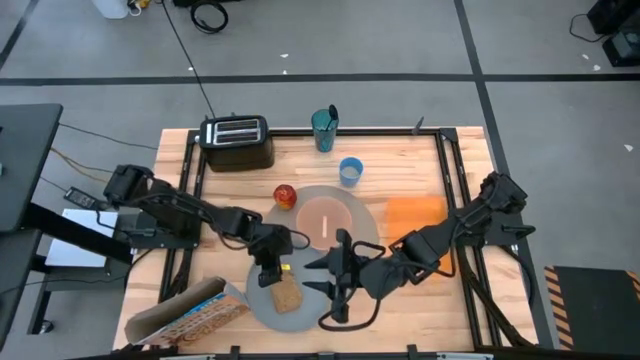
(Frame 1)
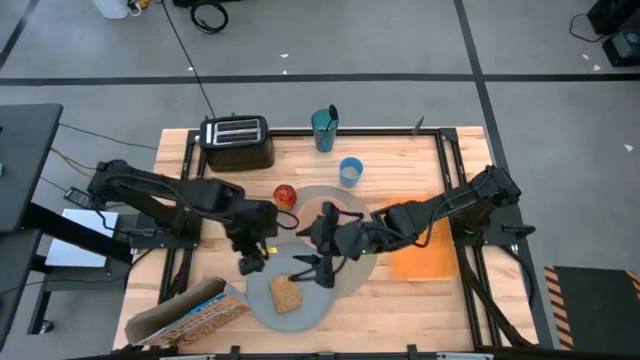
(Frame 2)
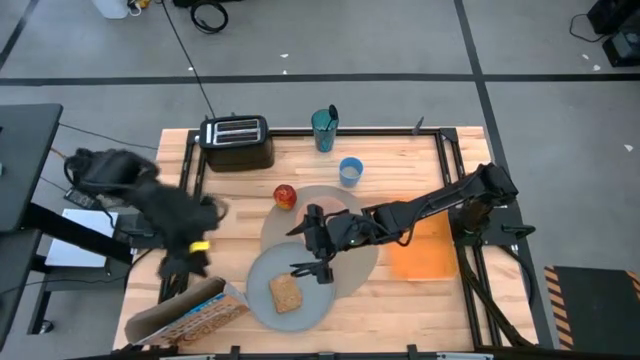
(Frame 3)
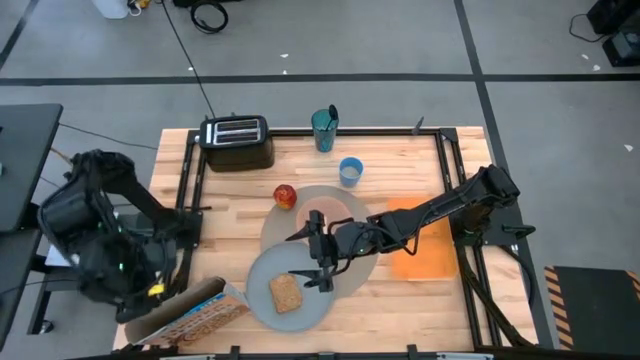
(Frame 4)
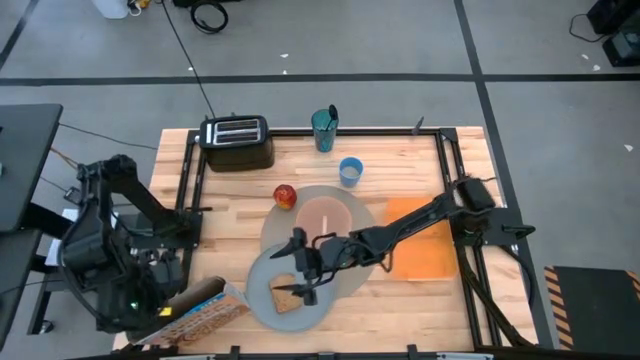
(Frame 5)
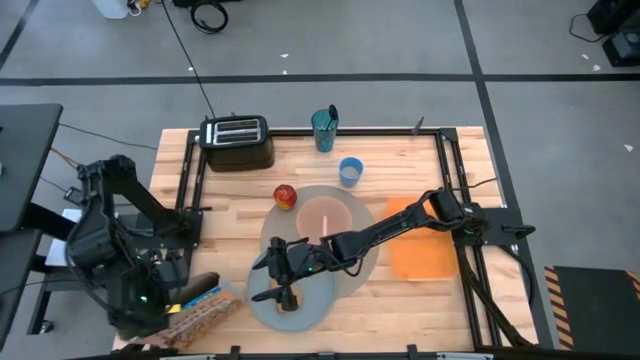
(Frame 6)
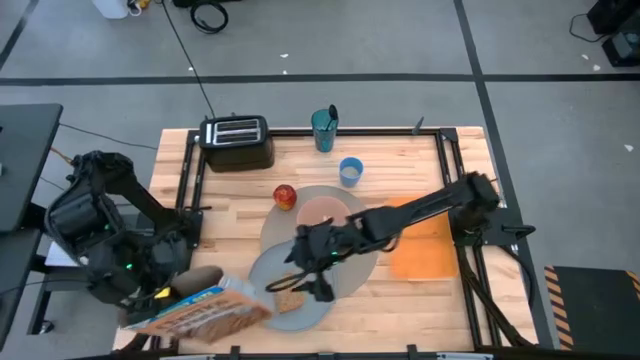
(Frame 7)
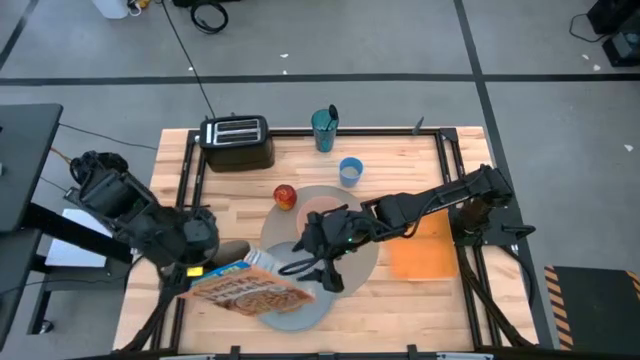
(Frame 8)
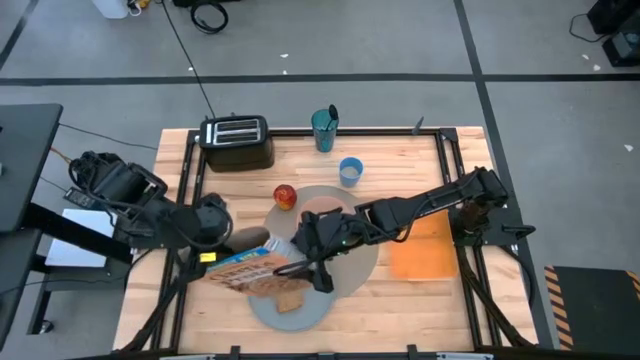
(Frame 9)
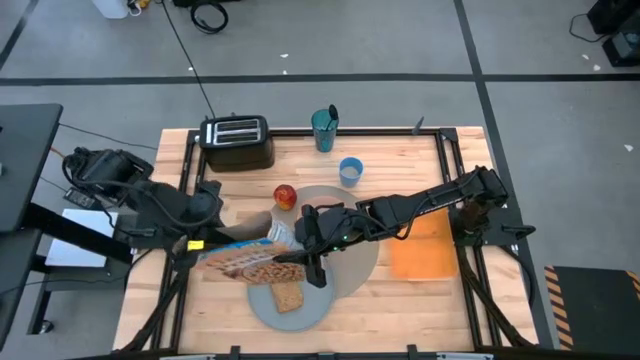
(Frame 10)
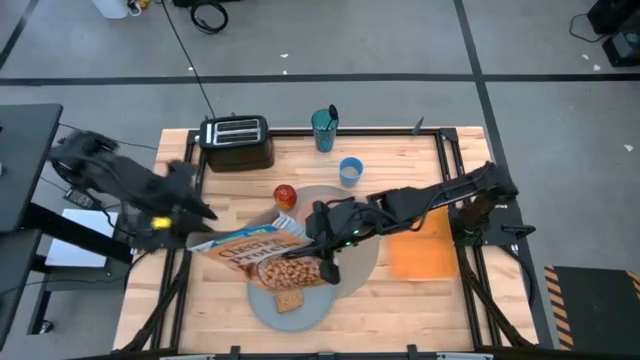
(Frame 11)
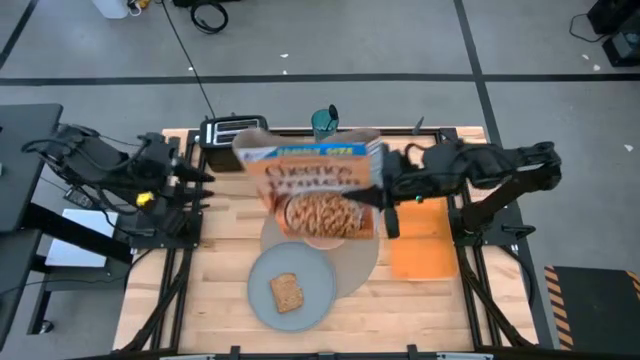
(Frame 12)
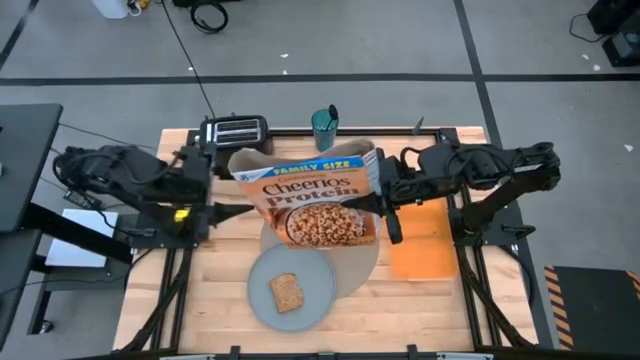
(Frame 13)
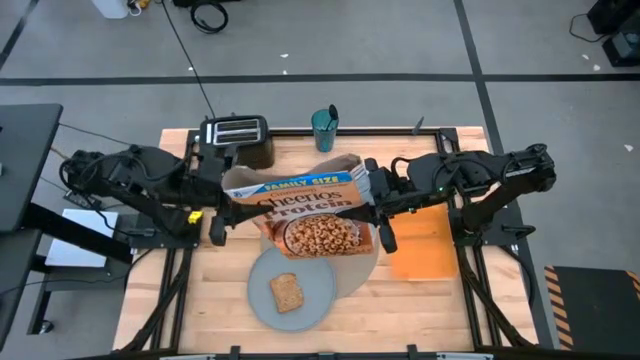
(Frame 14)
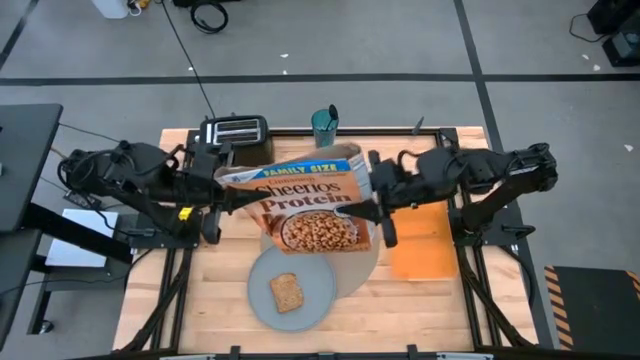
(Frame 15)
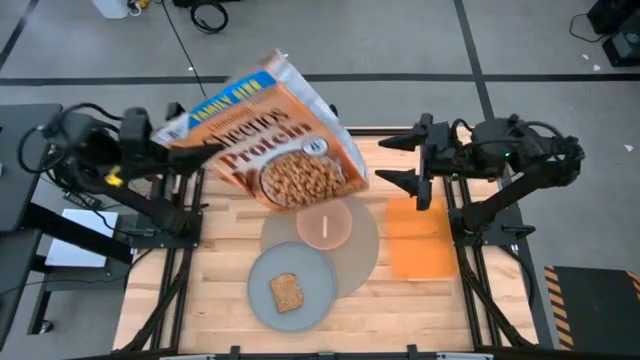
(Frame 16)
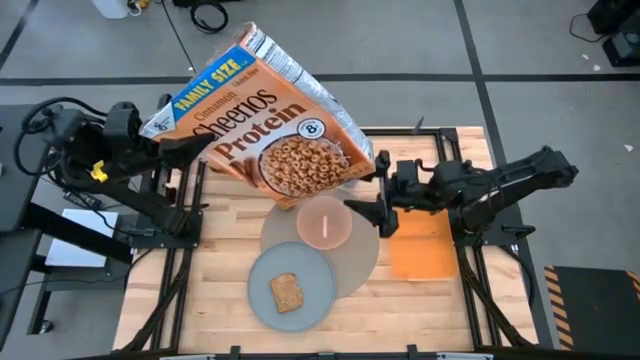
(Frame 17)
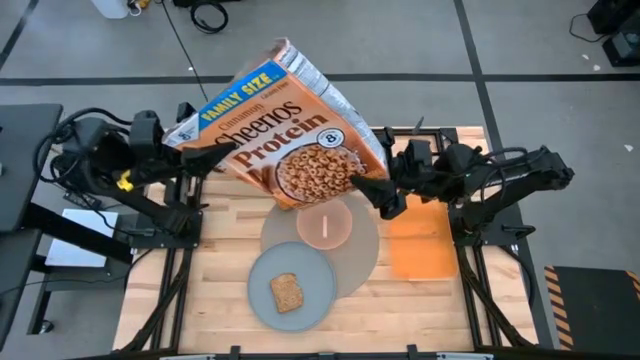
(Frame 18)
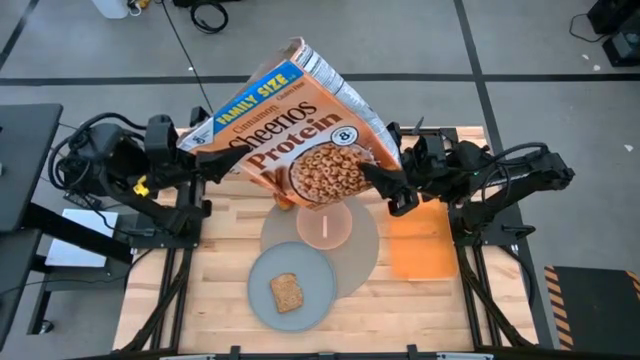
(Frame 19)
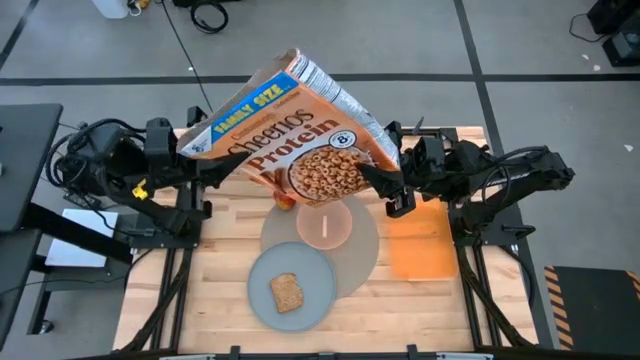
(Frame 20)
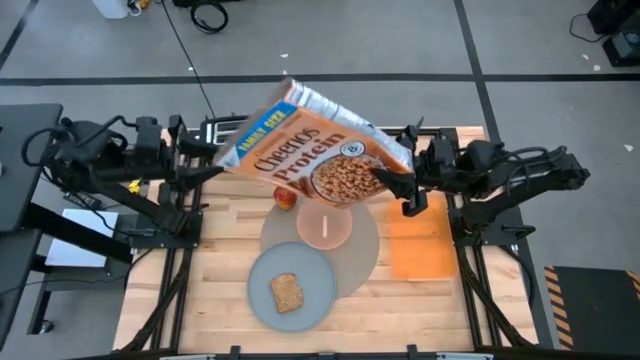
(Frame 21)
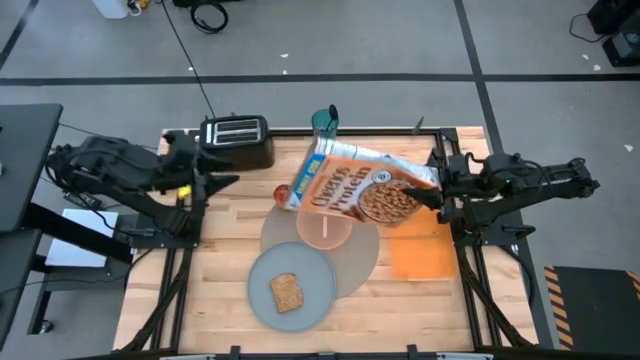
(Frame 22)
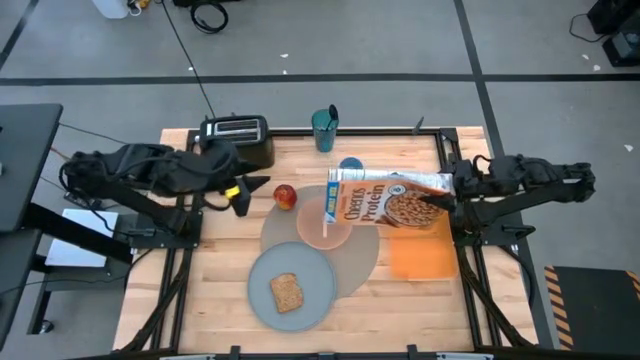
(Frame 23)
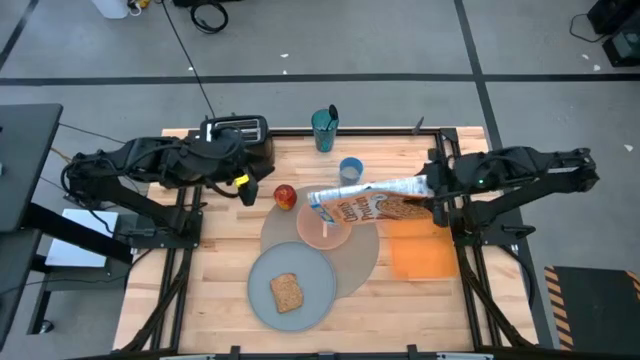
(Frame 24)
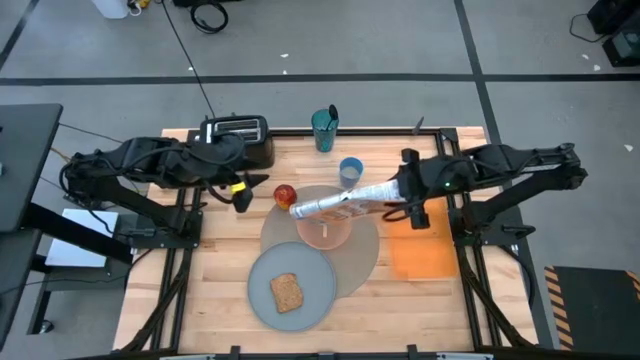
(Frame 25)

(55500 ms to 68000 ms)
Task: Arrange a breakfast setting
Pour the cereal from the cereal box into the light orange bowl

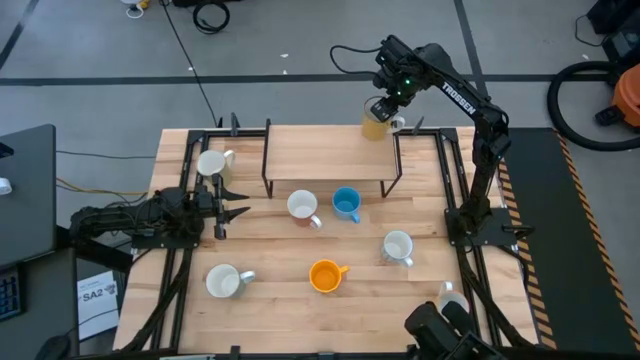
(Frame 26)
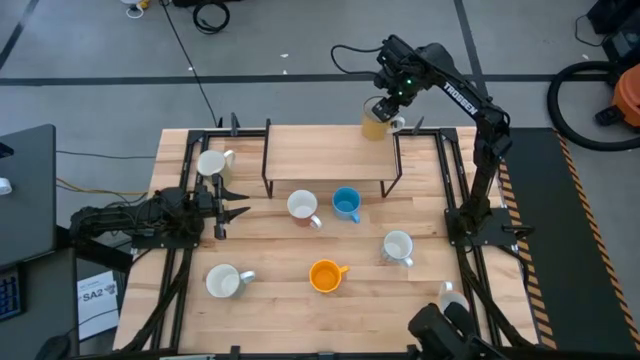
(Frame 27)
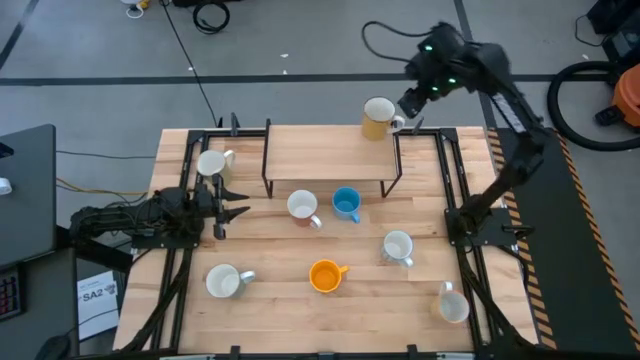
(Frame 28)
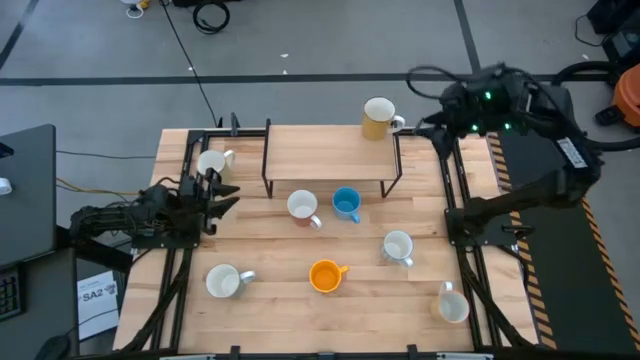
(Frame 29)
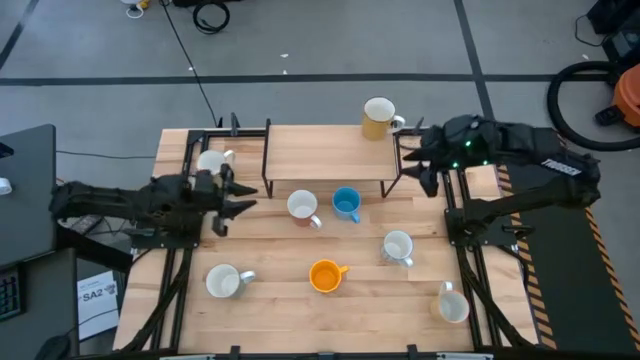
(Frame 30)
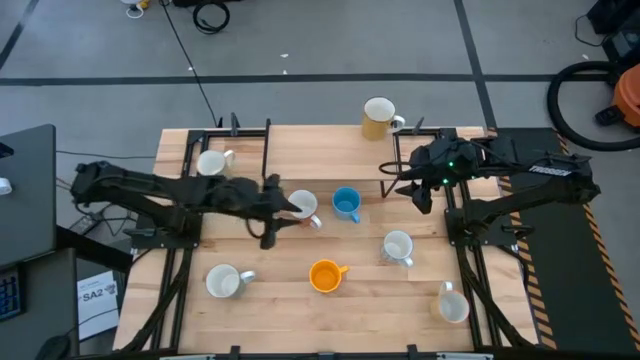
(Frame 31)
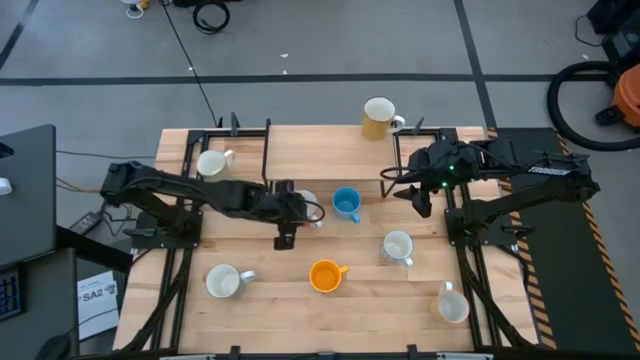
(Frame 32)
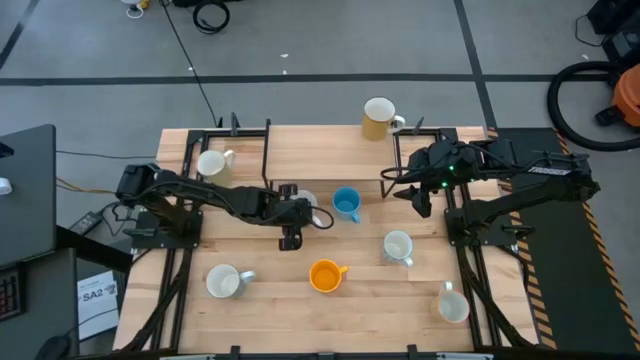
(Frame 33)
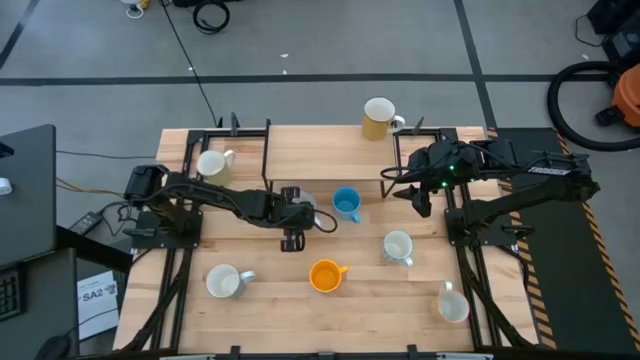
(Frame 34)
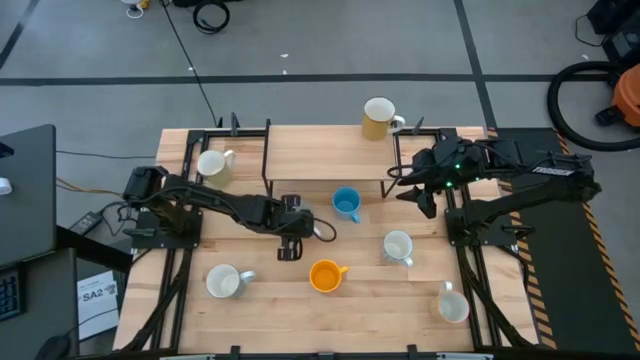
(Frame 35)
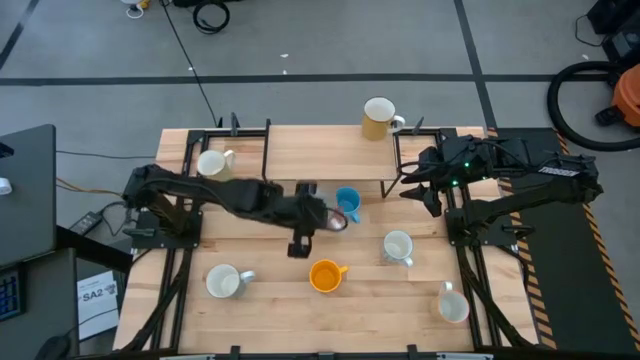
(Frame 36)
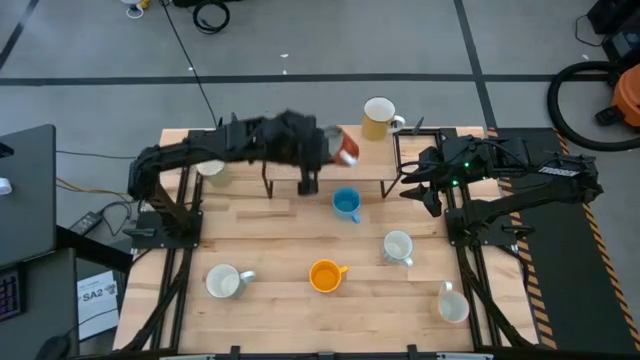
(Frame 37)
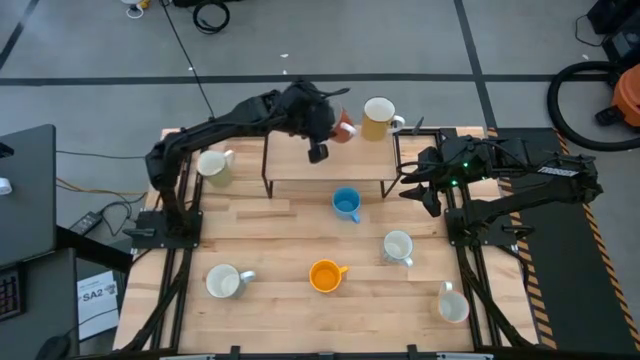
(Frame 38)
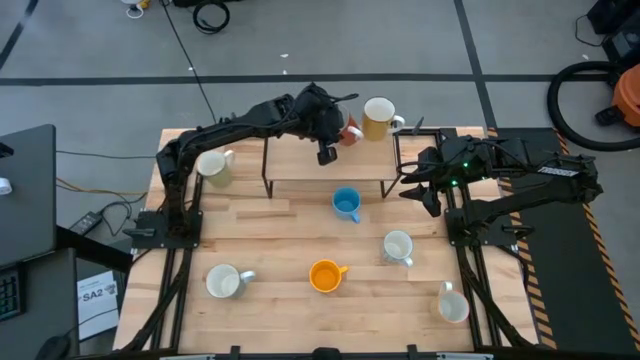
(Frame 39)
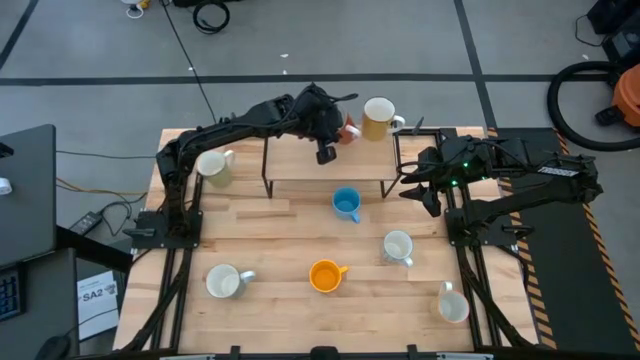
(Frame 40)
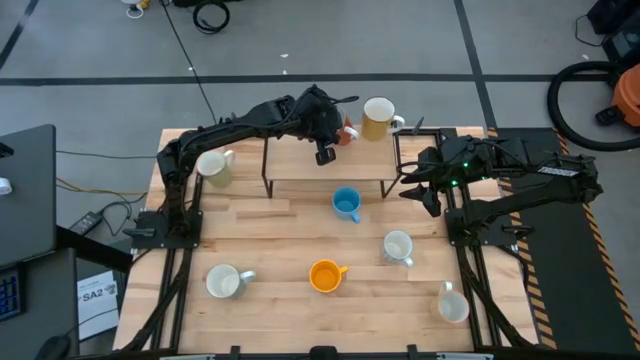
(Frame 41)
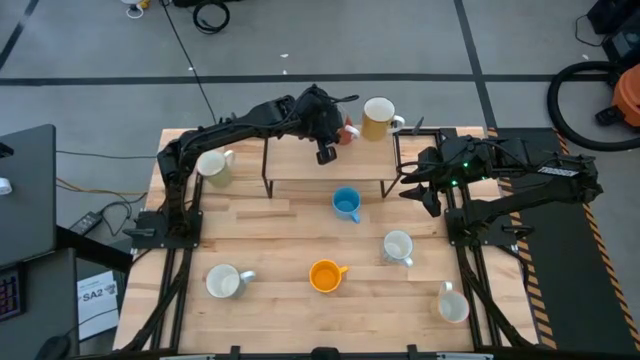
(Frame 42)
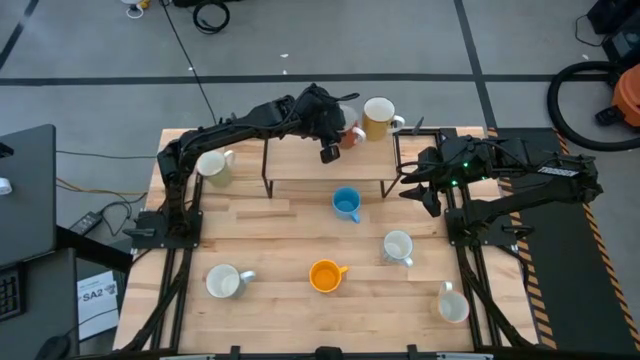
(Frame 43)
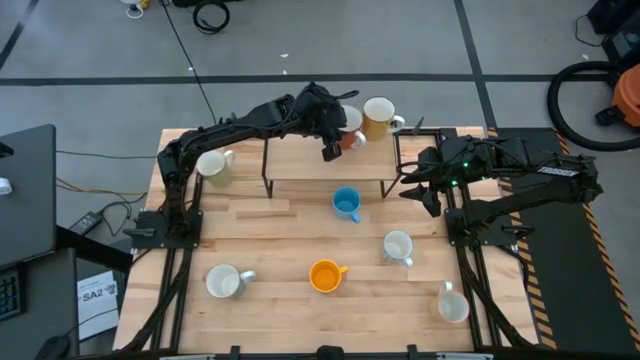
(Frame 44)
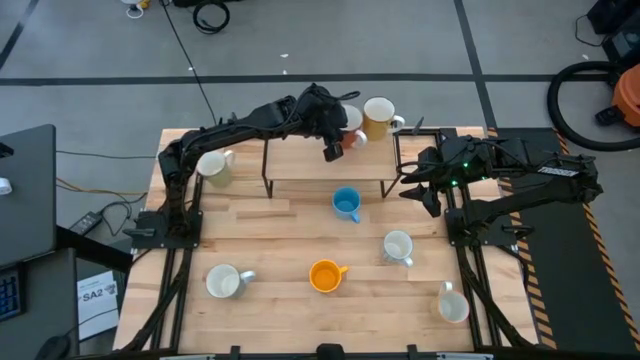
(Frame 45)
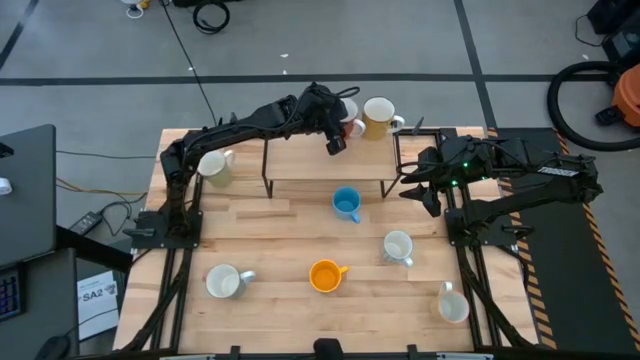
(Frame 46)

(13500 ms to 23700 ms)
Task: Place coffee mugs
Put the orange mug on the shelf
